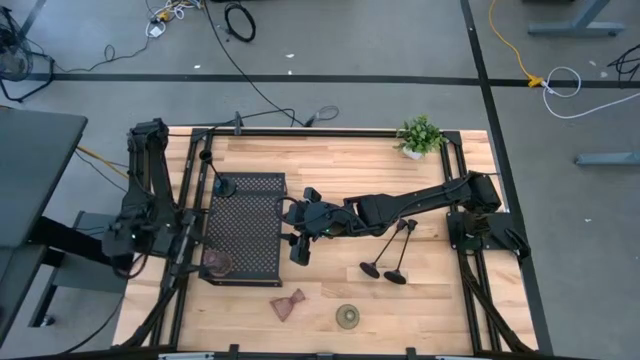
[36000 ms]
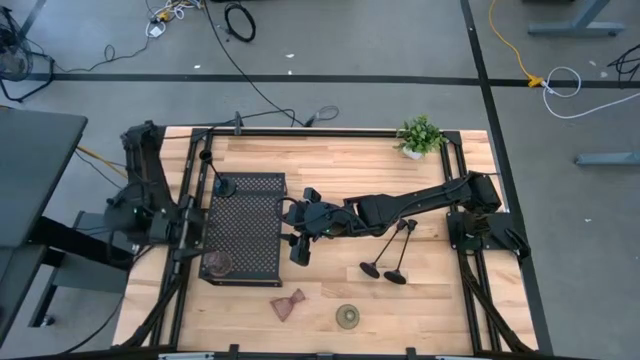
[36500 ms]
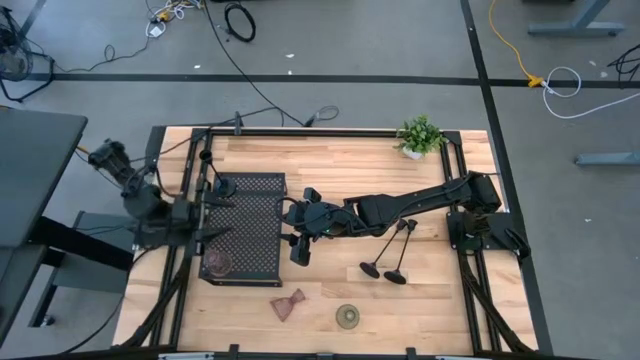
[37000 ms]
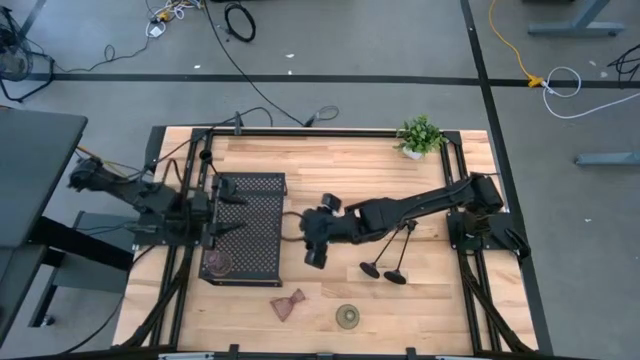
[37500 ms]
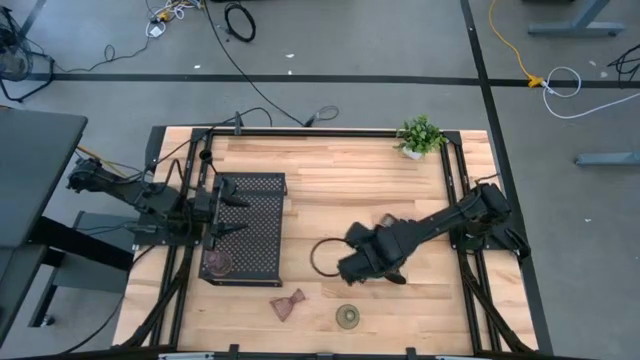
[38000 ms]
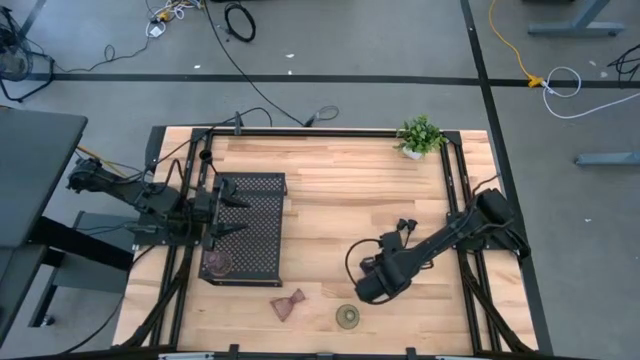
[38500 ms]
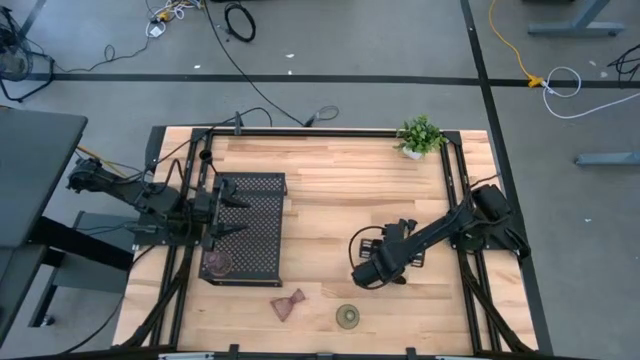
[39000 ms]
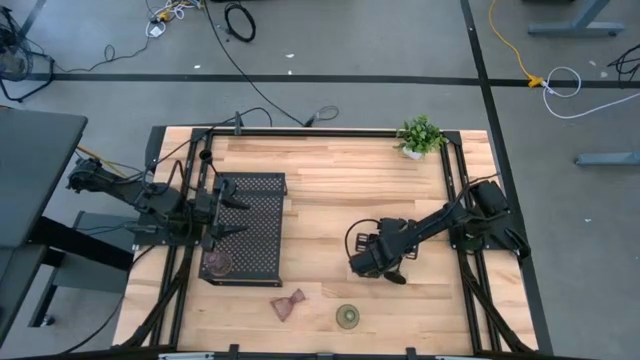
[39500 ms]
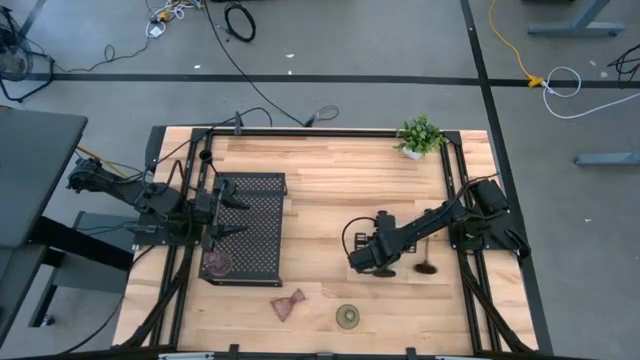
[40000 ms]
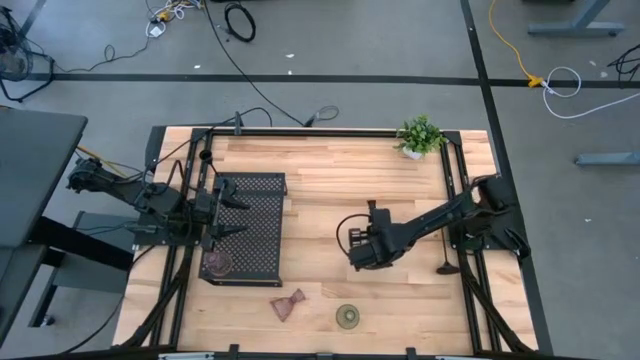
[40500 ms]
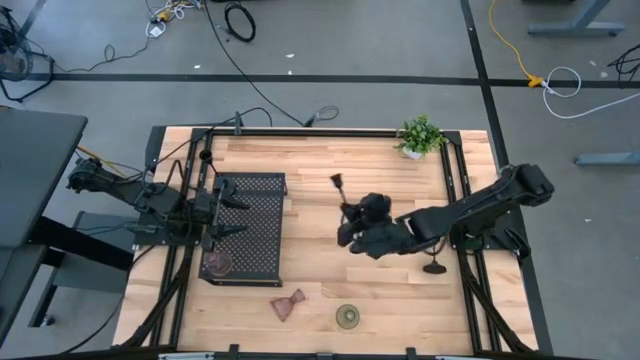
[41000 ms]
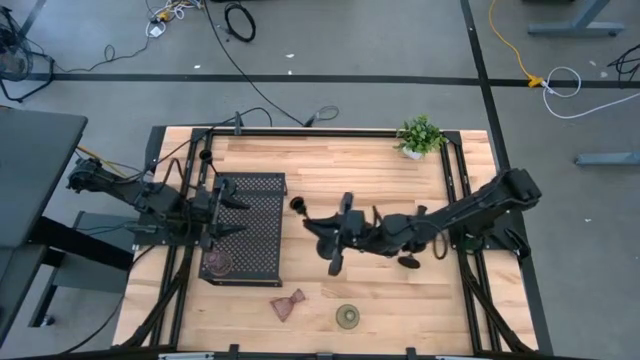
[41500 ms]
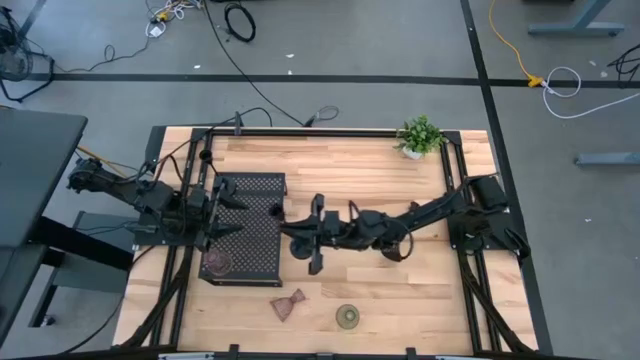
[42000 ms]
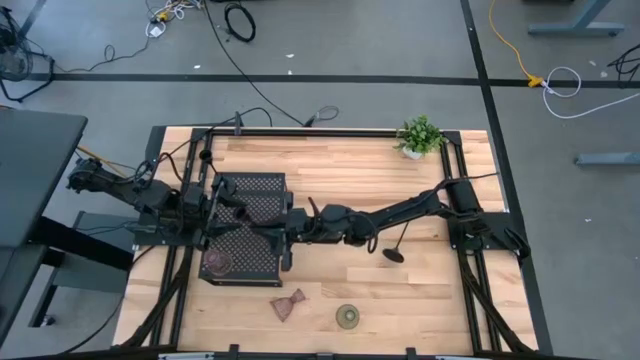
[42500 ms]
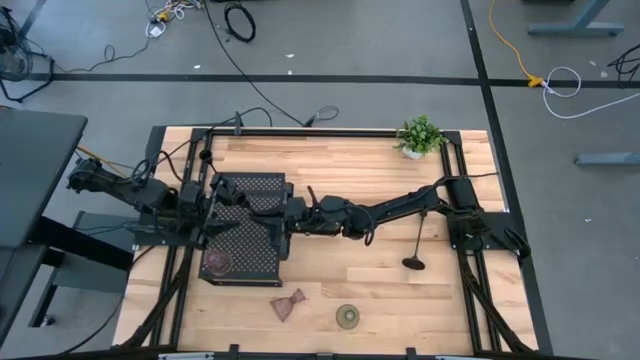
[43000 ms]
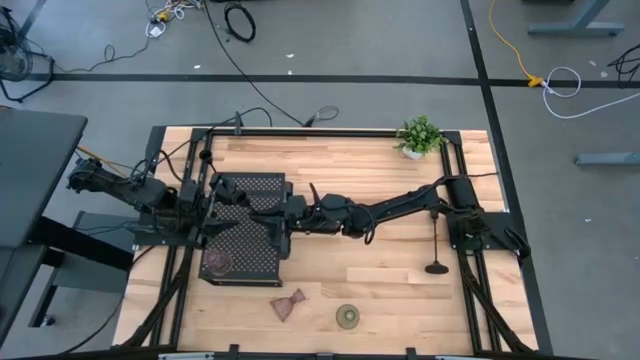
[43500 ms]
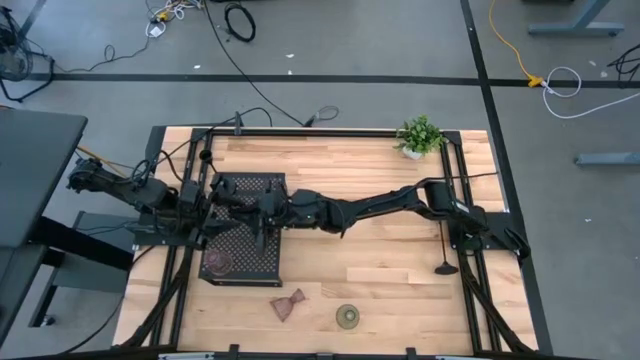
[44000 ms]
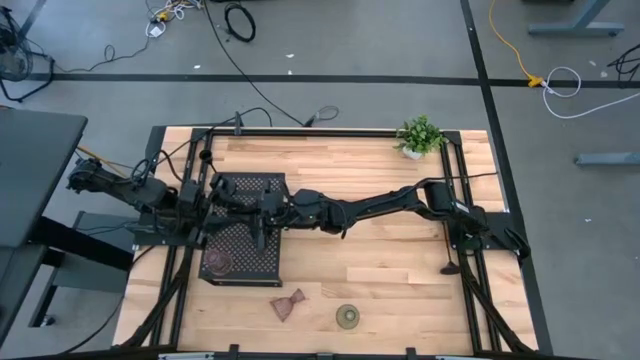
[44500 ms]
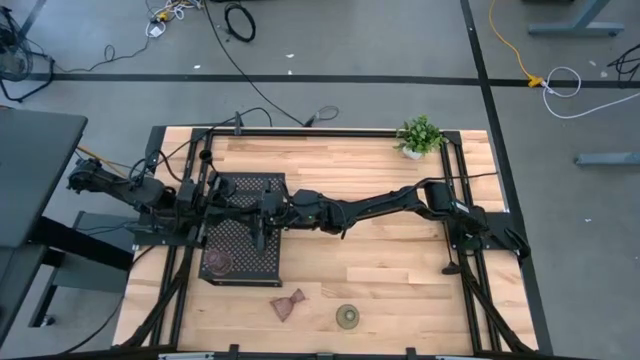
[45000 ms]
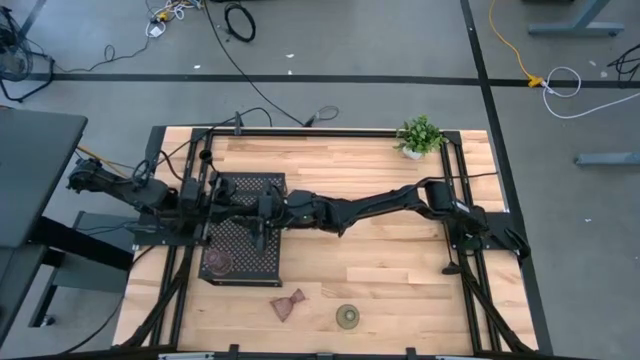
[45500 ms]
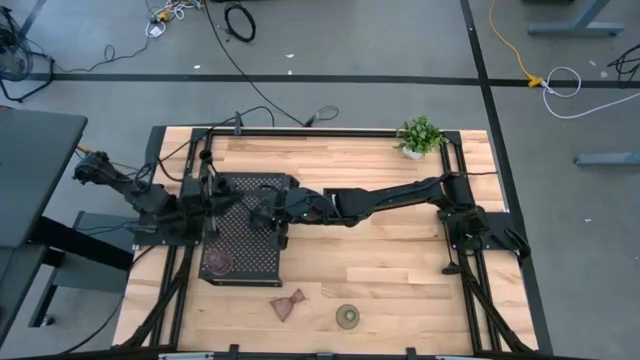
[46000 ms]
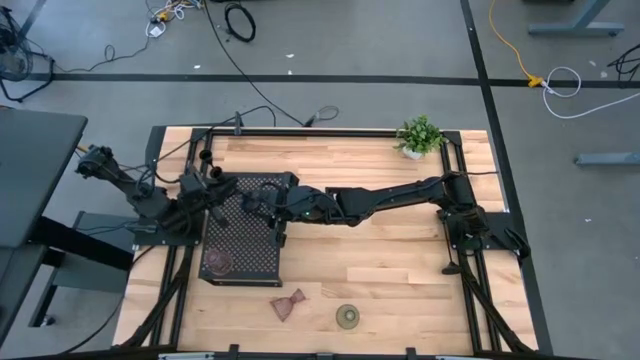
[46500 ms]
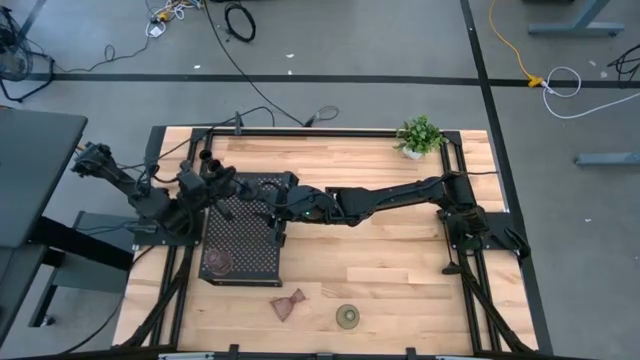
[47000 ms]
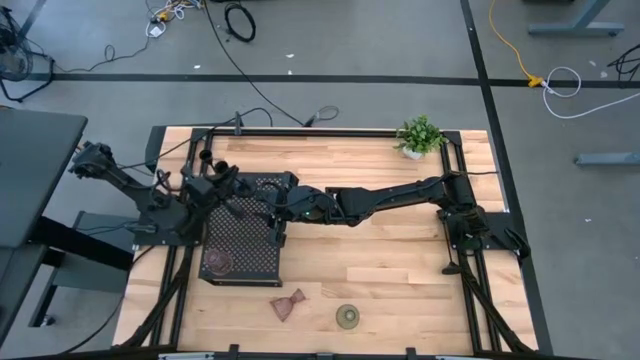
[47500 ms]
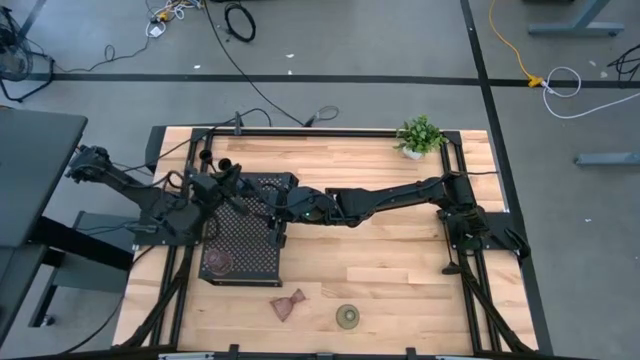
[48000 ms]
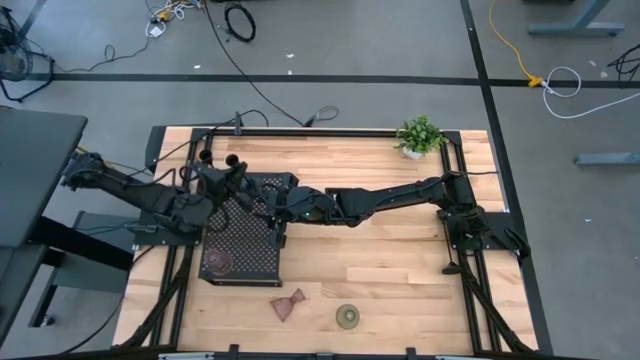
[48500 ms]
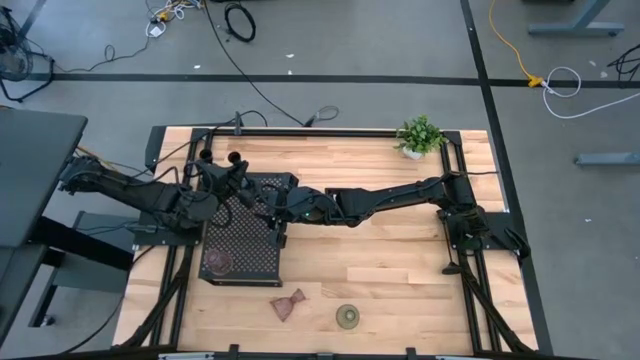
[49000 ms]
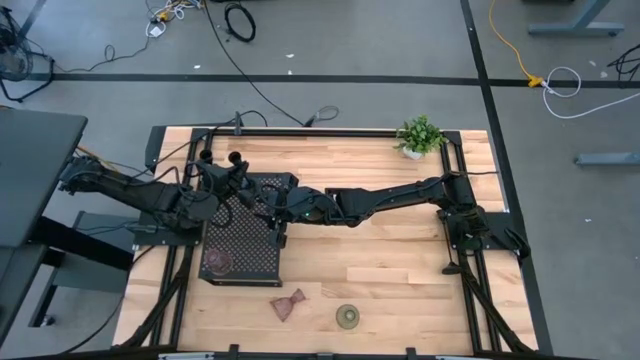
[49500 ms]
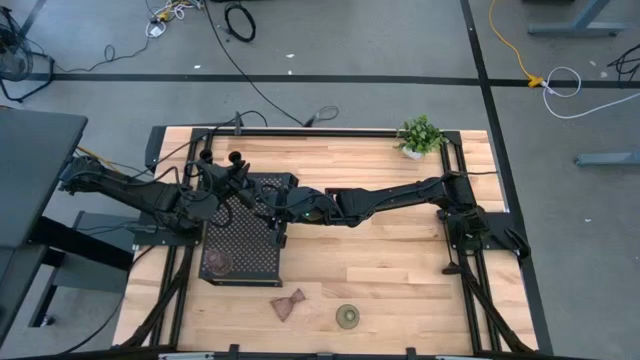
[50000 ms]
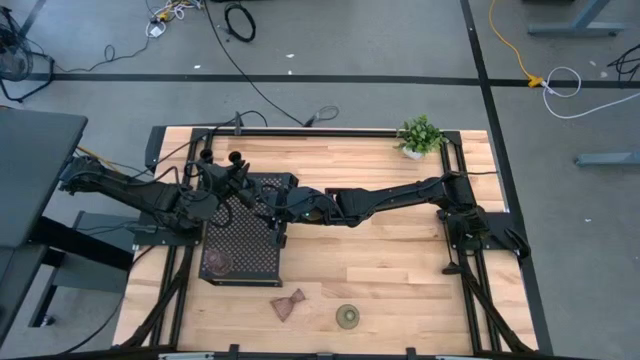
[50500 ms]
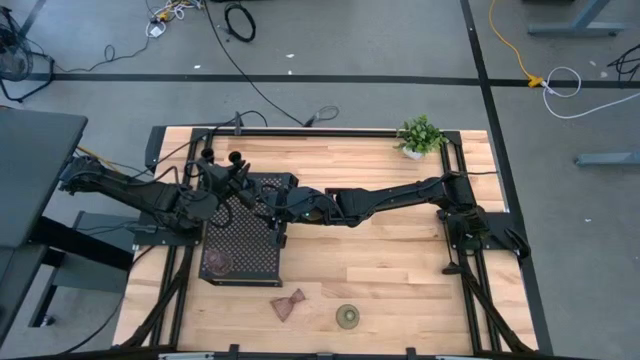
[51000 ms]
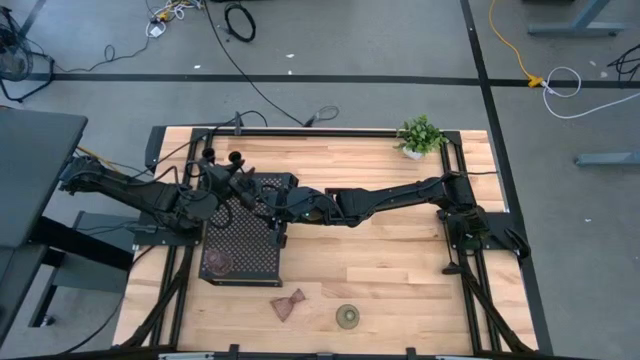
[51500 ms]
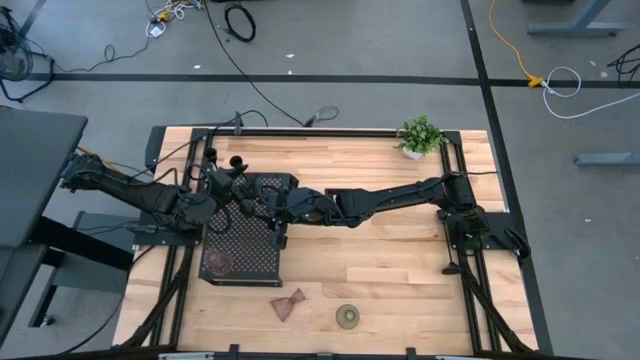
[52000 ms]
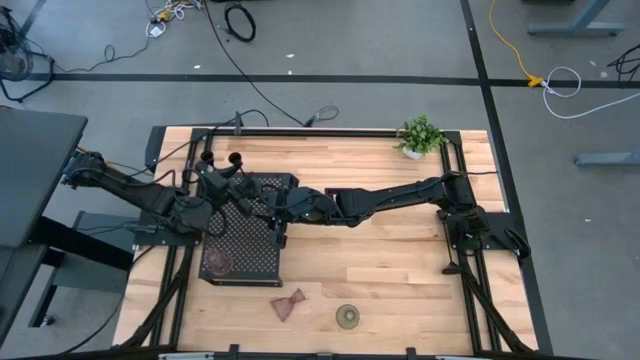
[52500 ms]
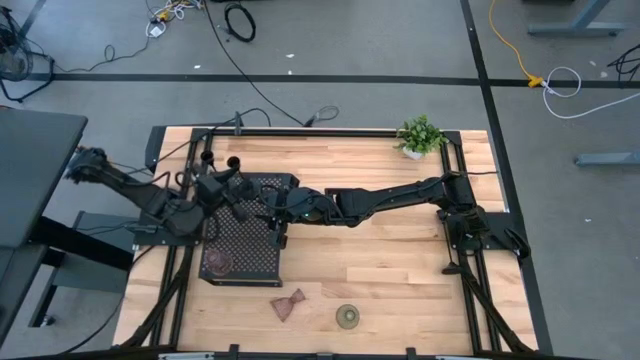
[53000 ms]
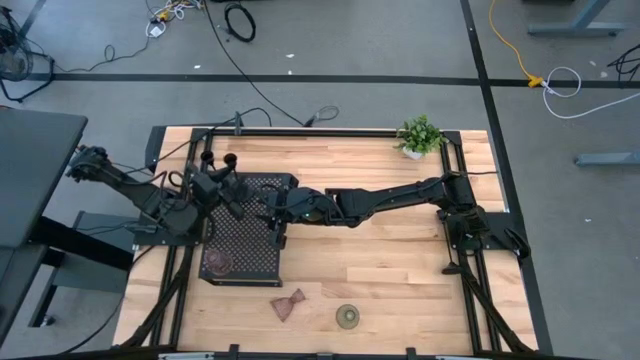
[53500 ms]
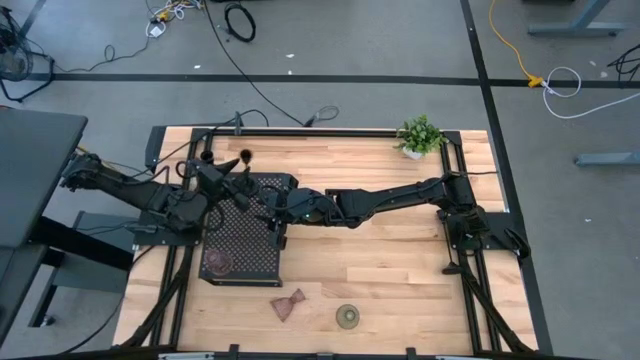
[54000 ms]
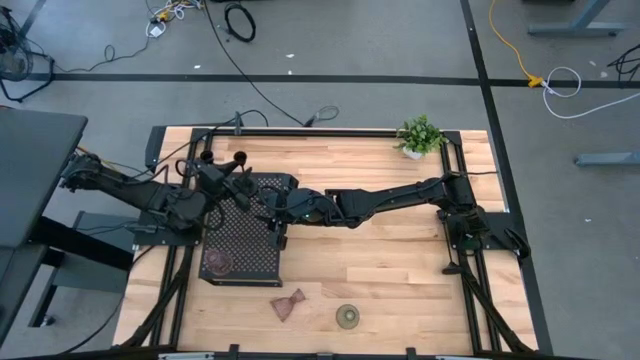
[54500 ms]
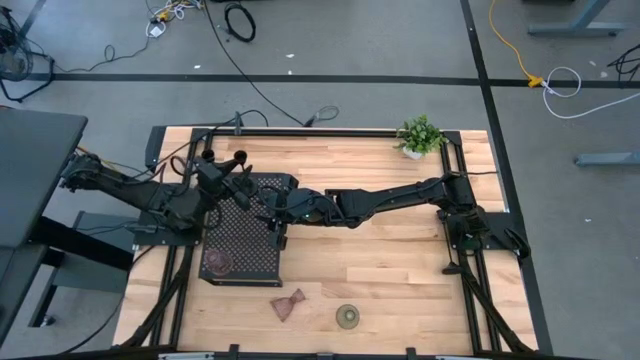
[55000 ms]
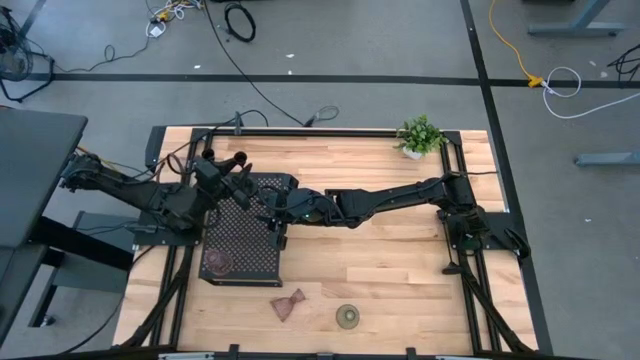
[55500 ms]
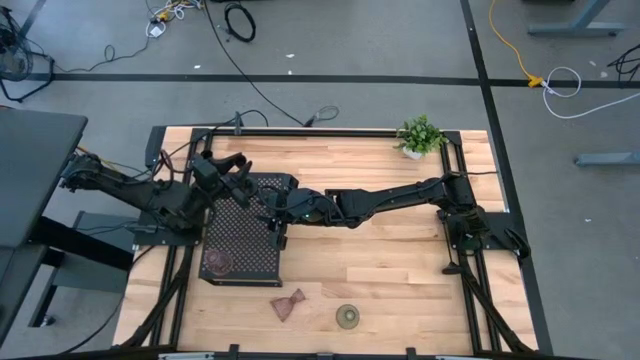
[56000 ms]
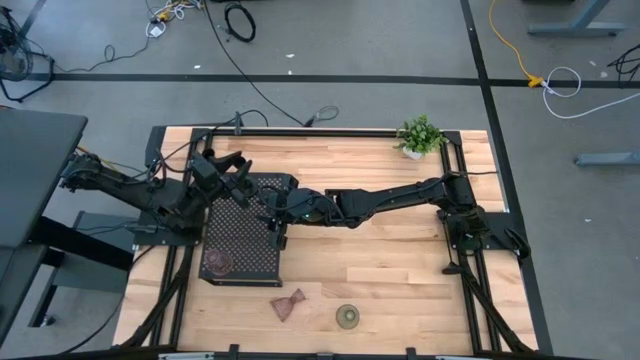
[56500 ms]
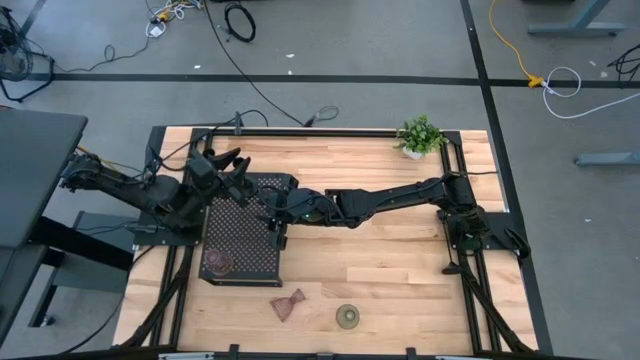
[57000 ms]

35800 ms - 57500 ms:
Task: Pick & Place candle stick holders
Put the left black candle holder on the shelf aligned with the other black candle holder
